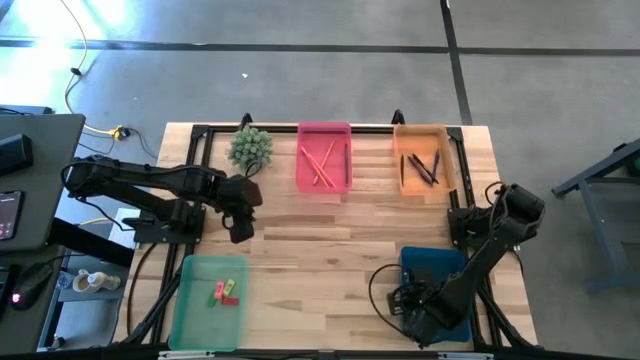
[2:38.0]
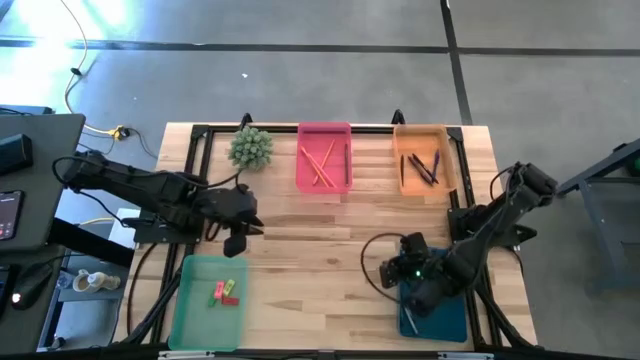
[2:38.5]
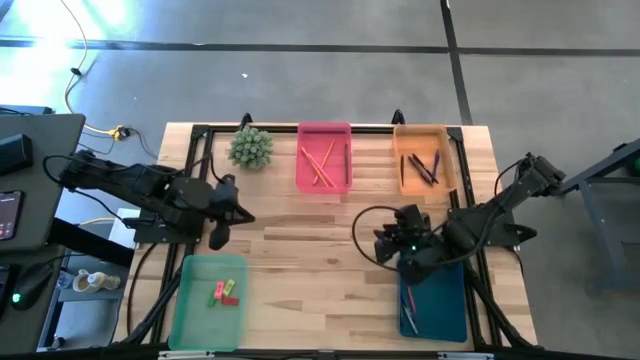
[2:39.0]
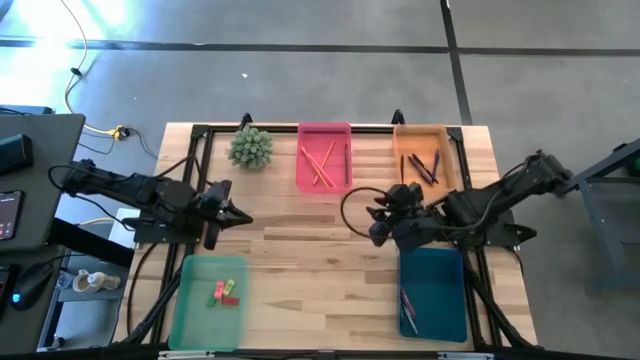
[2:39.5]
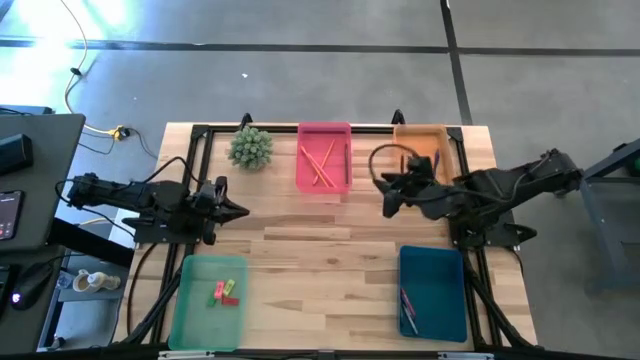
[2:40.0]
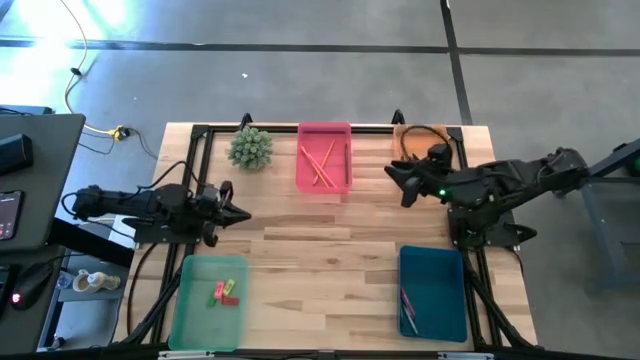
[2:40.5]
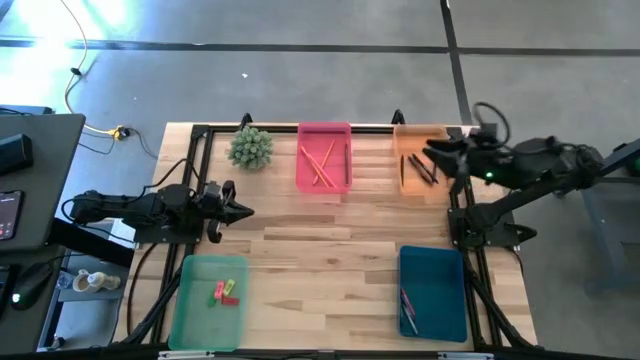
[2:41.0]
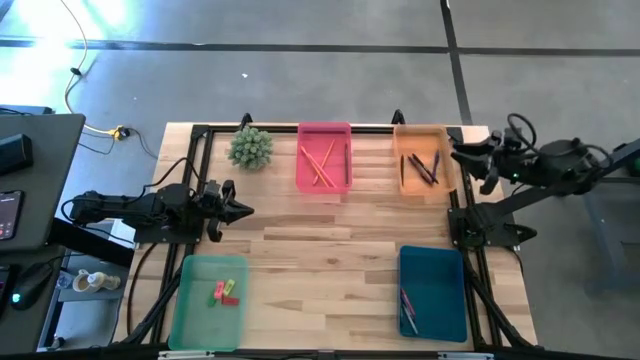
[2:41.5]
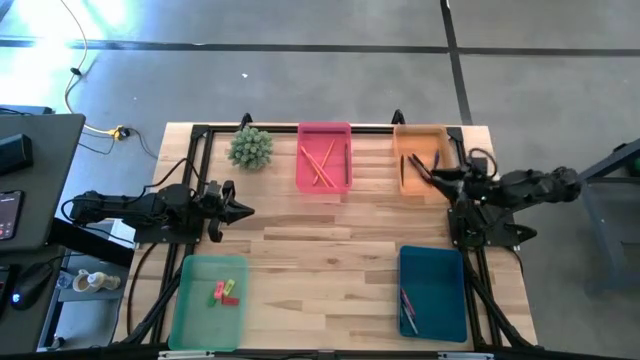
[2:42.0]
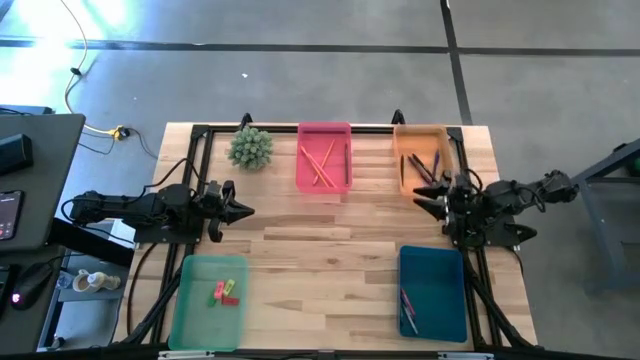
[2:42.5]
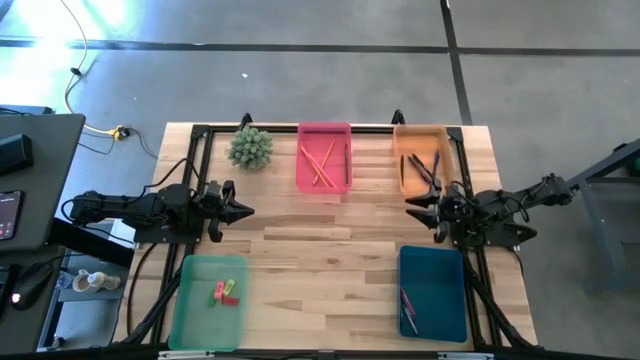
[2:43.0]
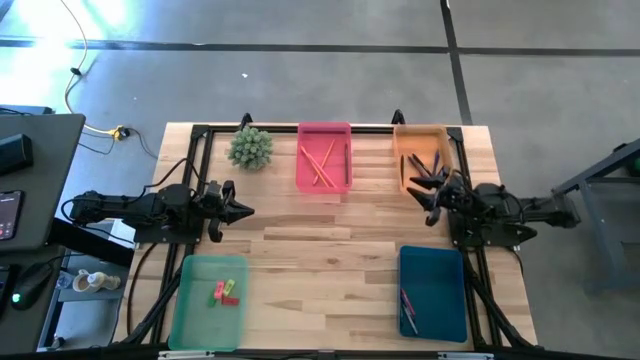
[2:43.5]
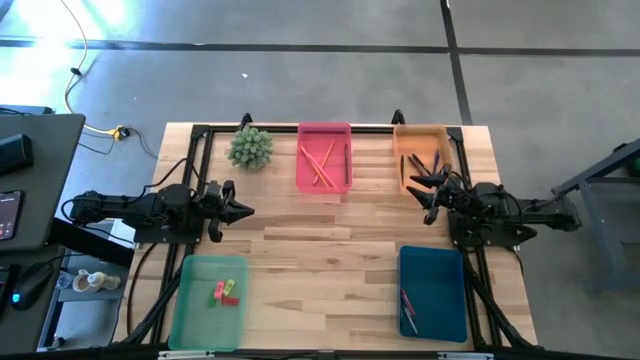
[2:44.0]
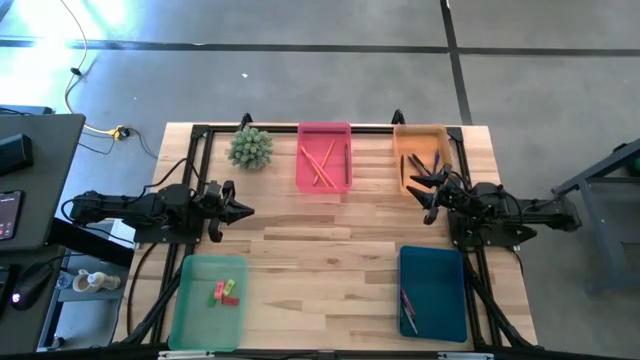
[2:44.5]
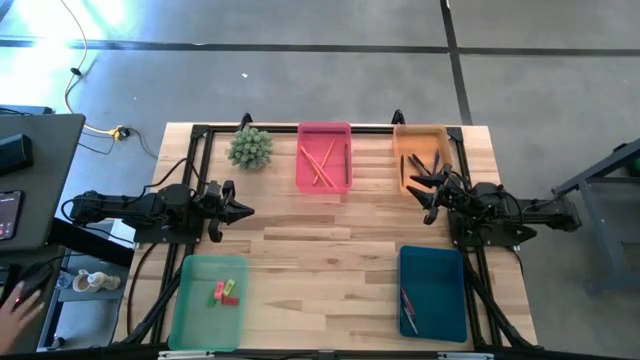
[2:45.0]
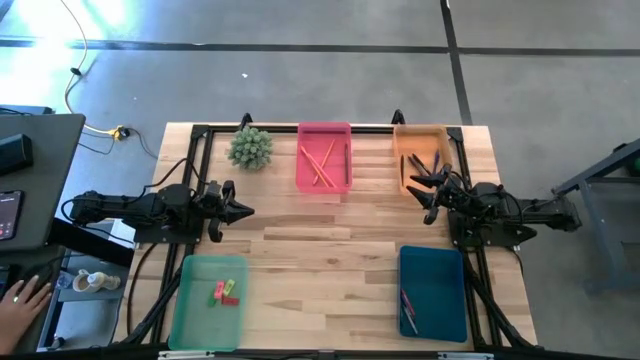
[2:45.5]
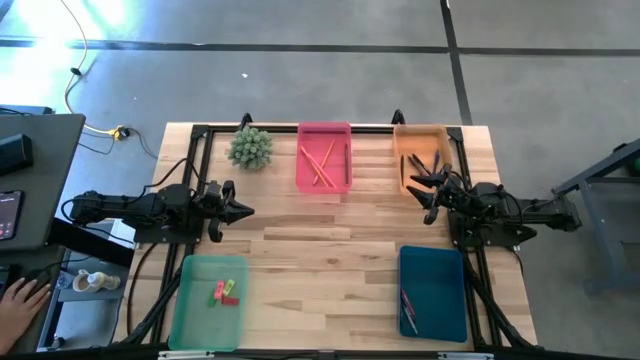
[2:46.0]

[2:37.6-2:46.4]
Task: Sort crayons/erasers/pens/pencils in bins
Return to Home Position

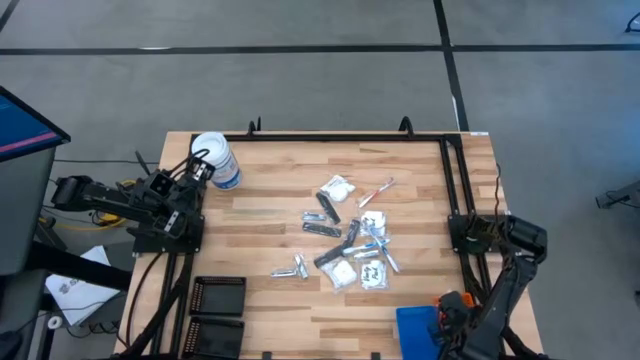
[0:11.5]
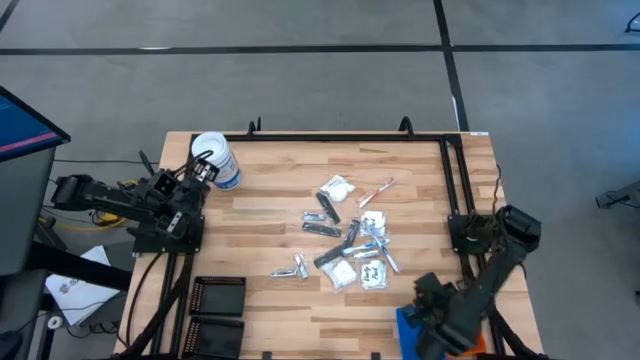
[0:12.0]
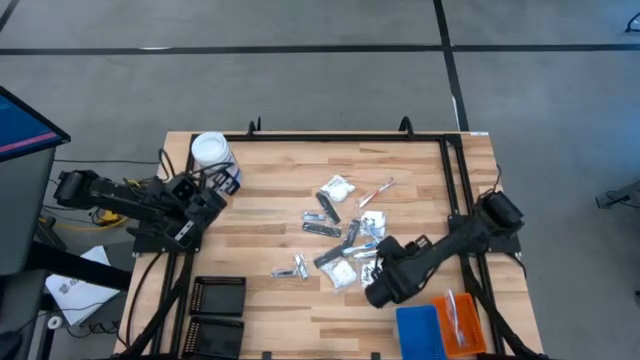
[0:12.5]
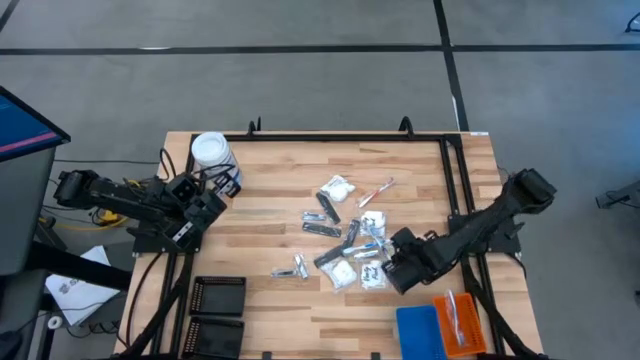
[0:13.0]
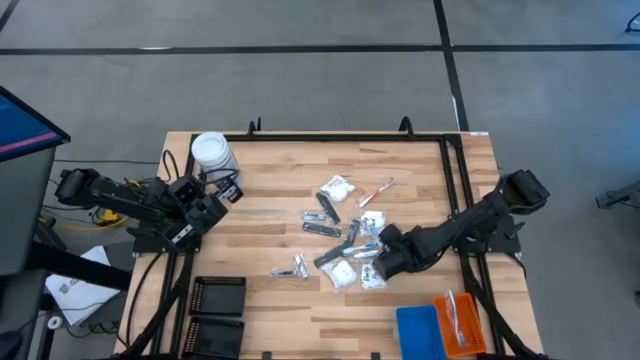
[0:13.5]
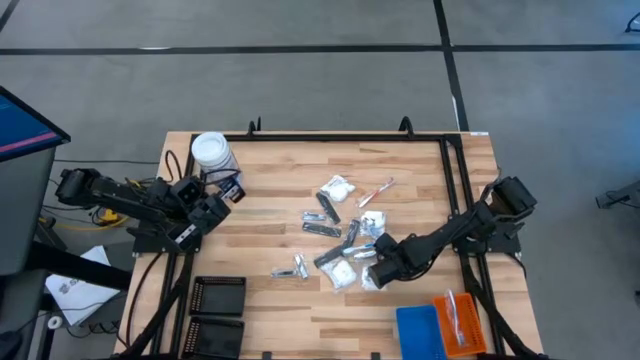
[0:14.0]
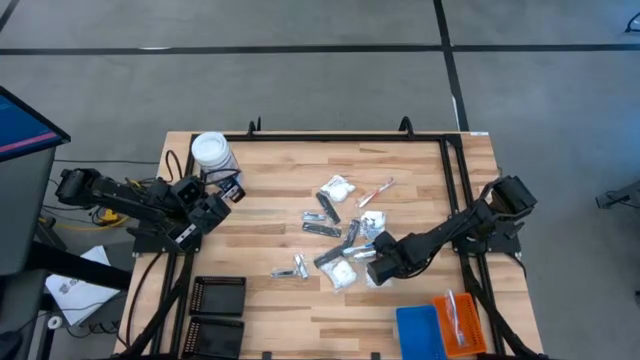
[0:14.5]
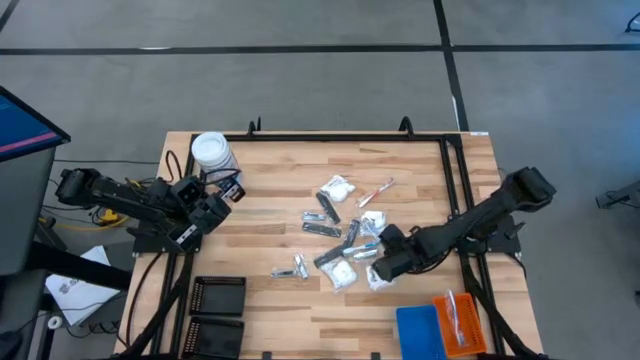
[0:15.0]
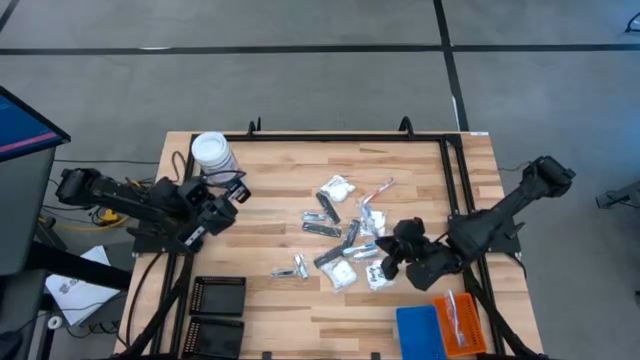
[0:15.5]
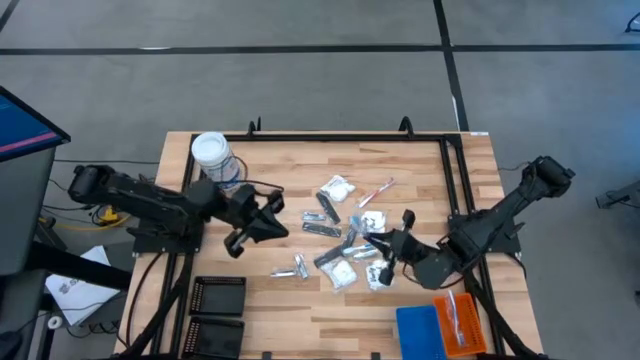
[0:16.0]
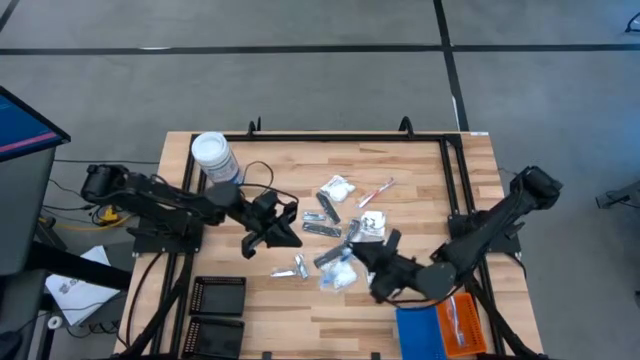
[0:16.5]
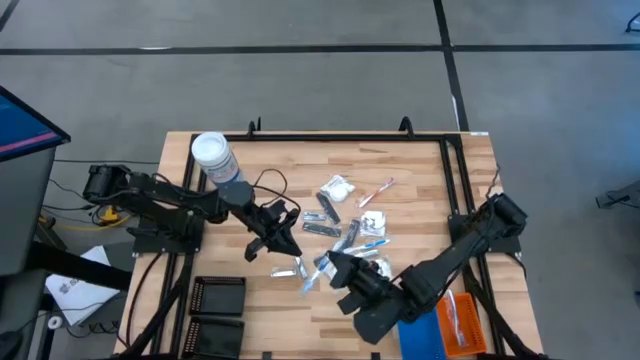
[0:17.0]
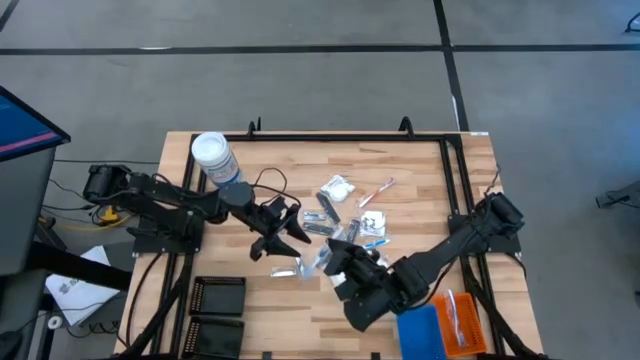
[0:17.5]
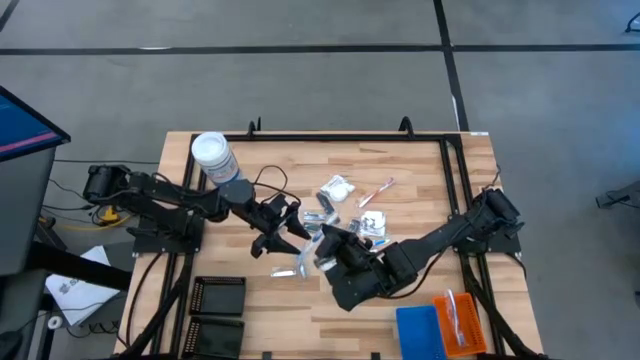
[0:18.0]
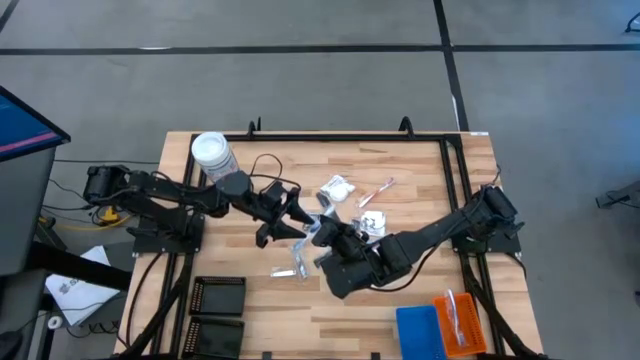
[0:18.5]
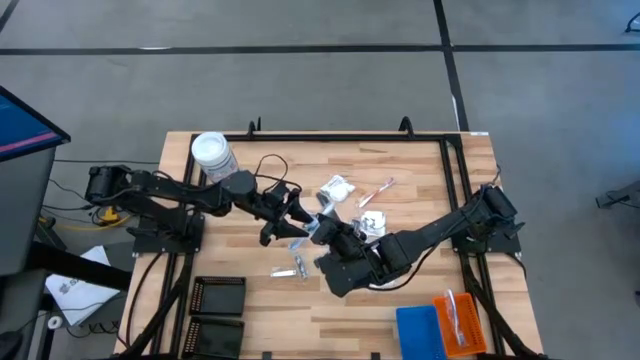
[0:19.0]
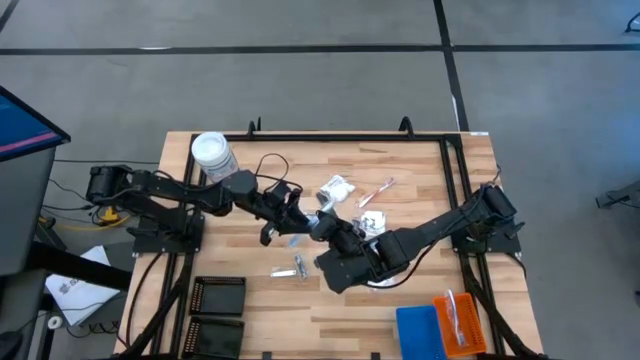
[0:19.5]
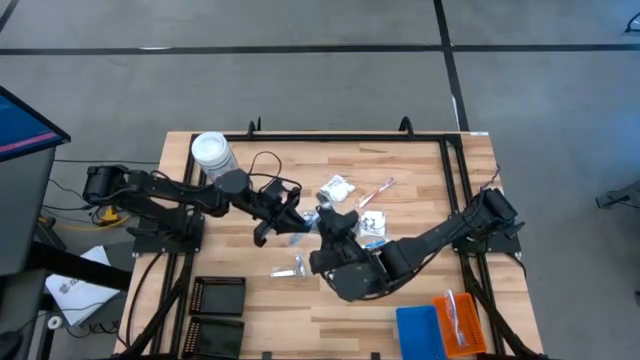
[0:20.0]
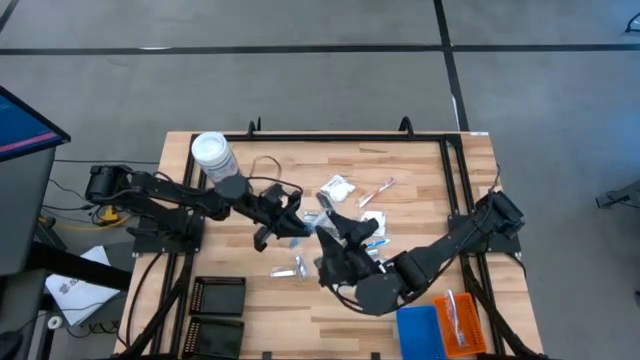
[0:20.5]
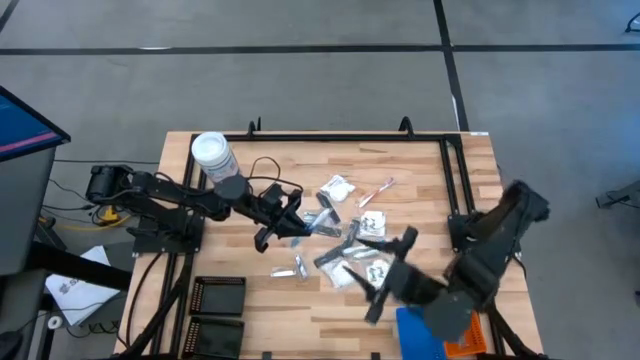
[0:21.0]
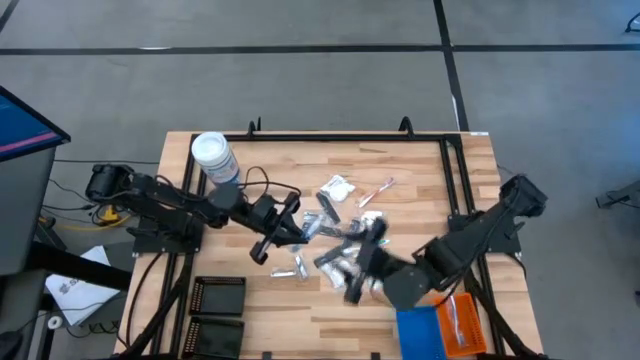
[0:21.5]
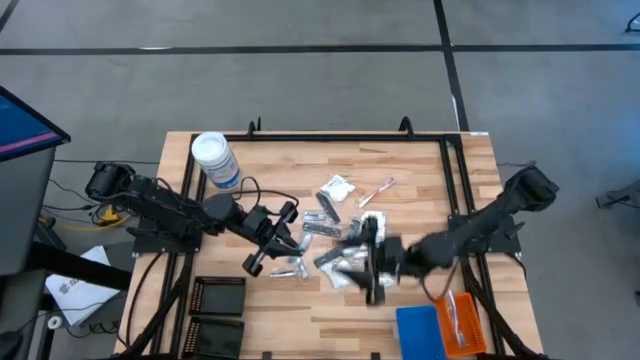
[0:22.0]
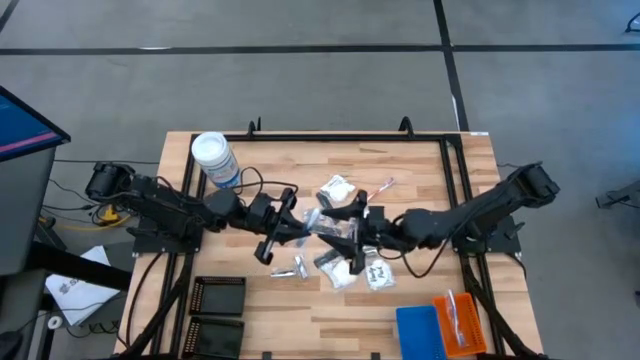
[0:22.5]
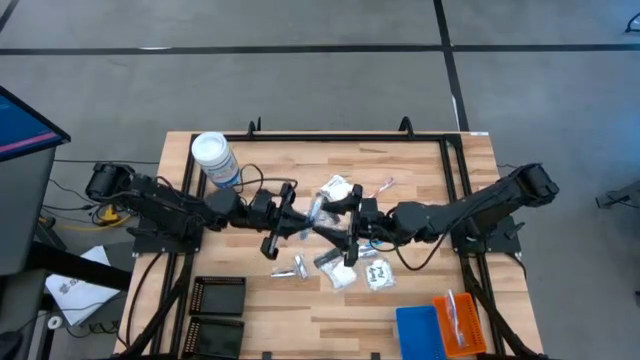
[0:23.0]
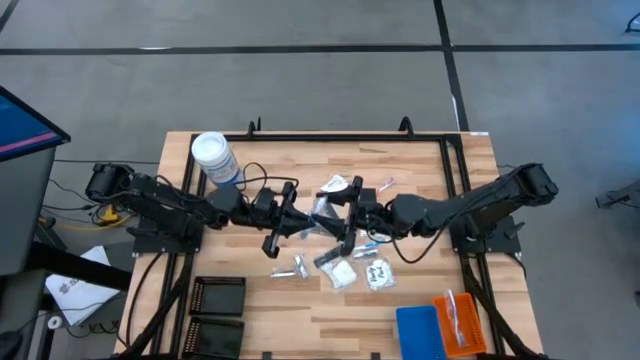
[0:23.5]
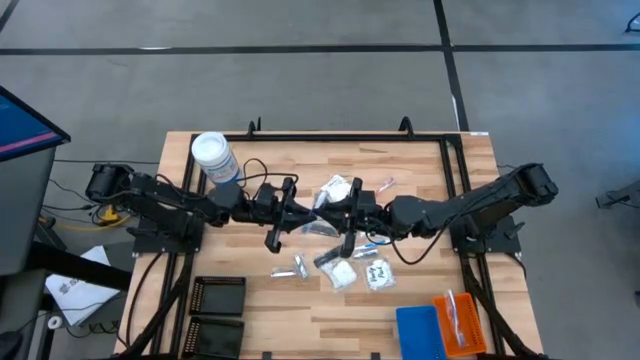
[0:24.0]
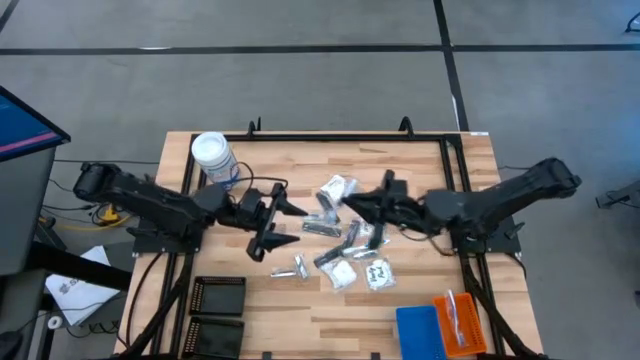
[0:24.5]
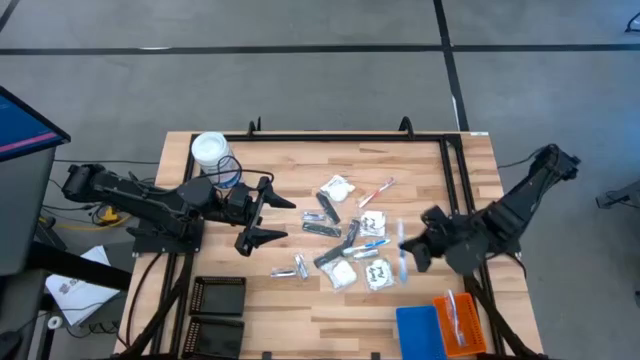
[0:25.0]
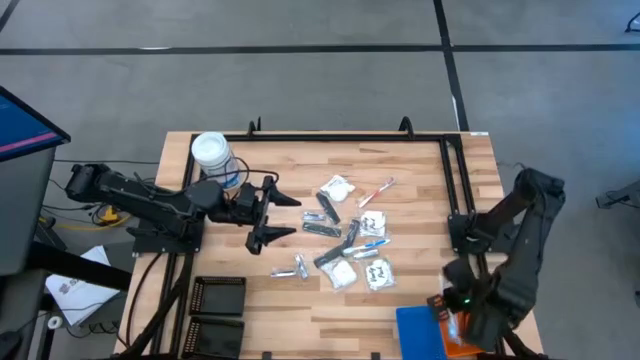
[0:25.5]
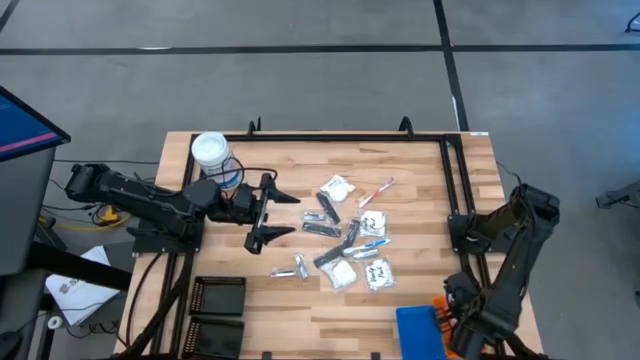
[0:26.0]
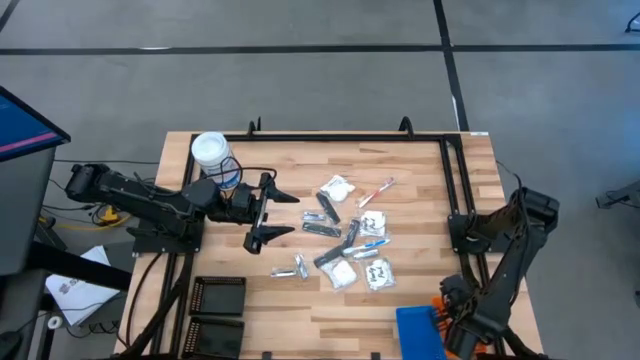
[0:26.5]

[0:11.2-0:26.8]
Task: Pick & Place Travel size toiletries
Put the blue toothbrush into the orange bin
